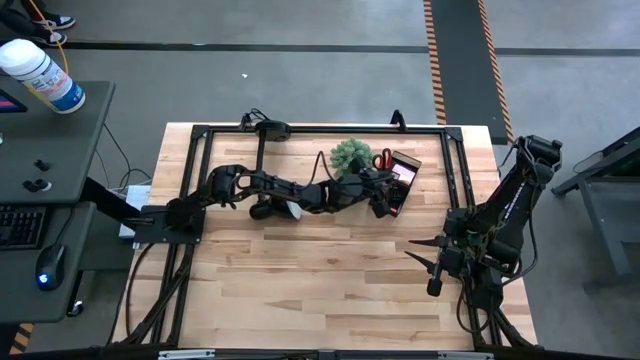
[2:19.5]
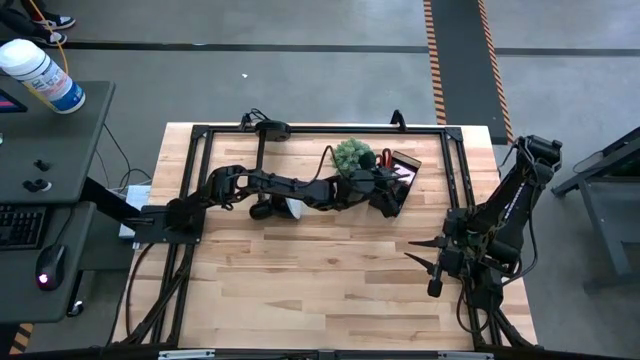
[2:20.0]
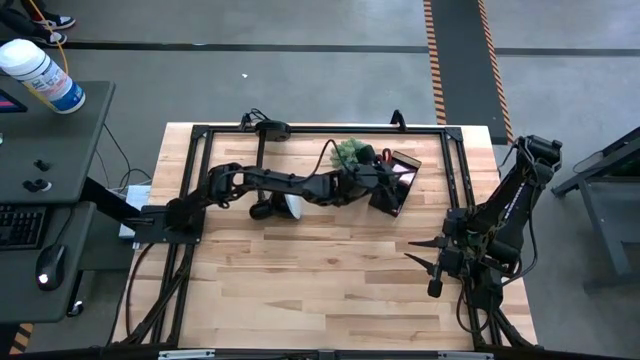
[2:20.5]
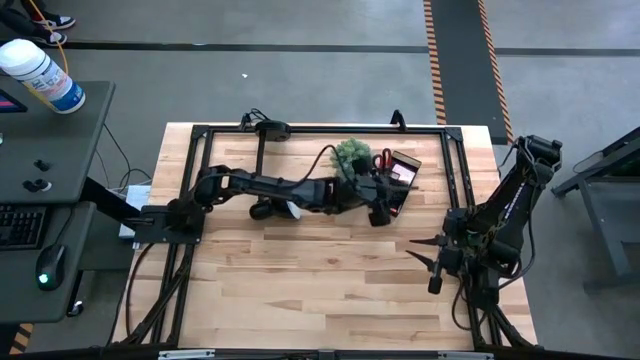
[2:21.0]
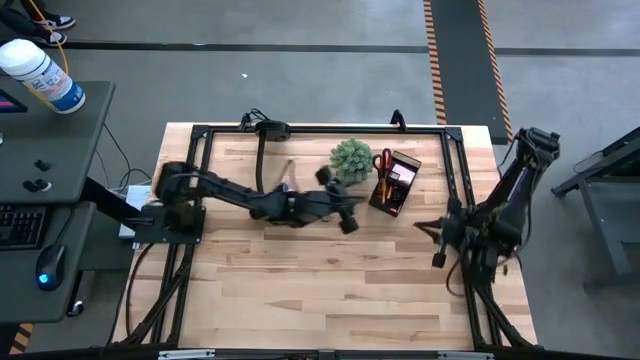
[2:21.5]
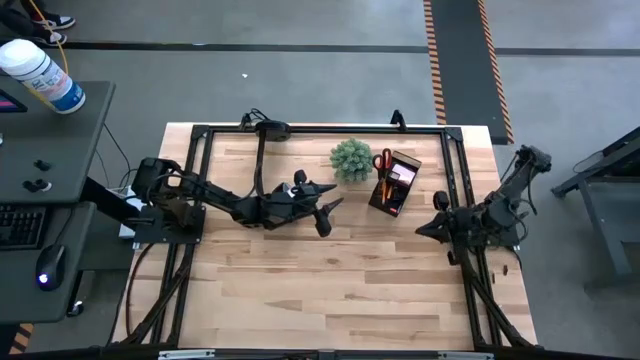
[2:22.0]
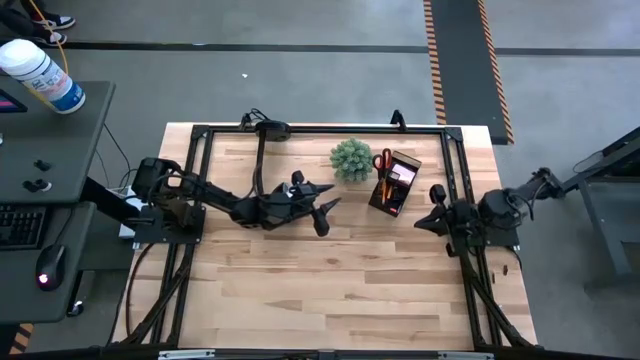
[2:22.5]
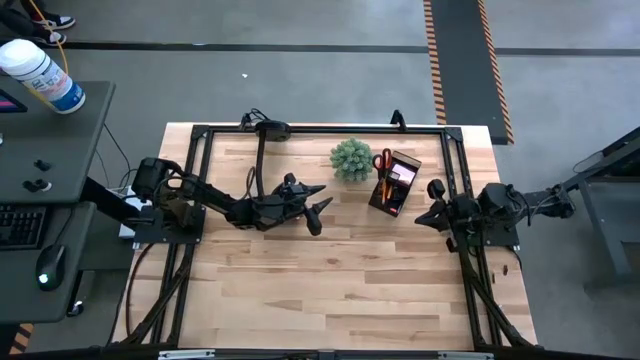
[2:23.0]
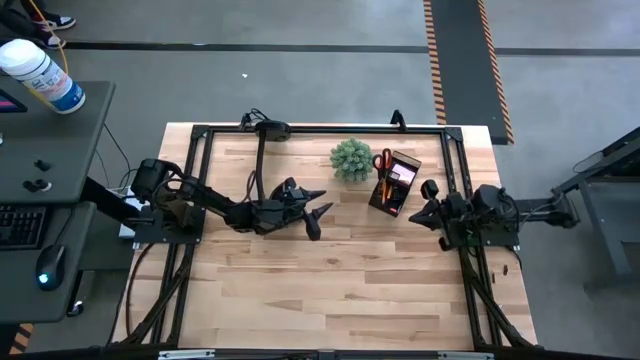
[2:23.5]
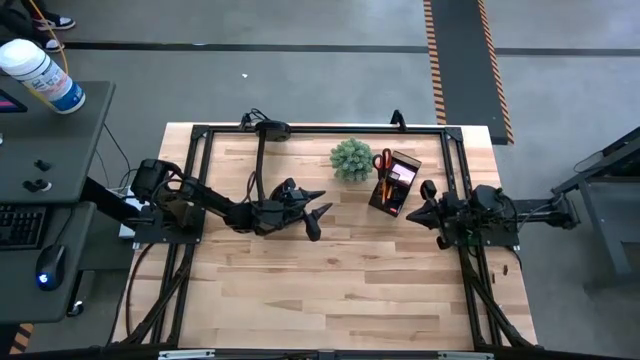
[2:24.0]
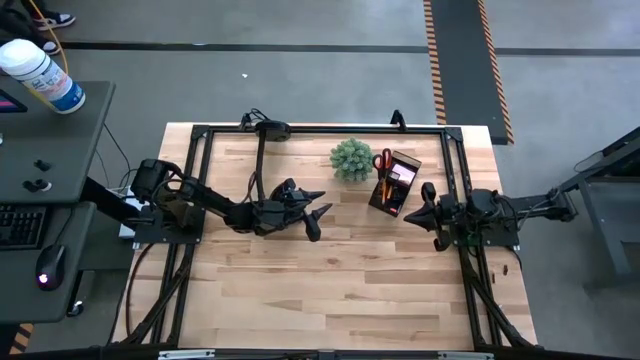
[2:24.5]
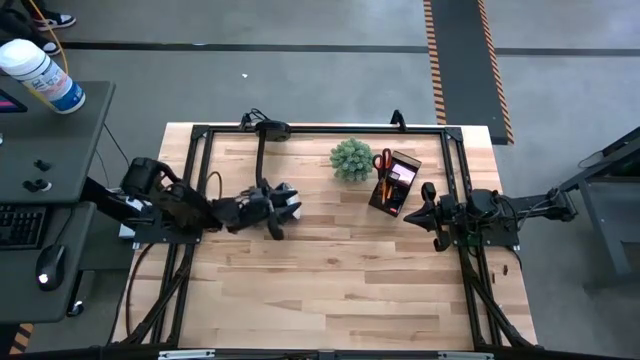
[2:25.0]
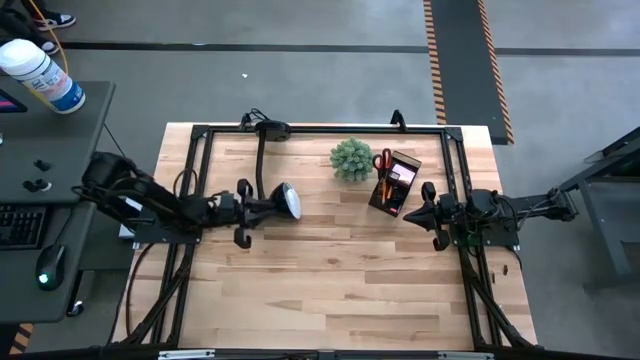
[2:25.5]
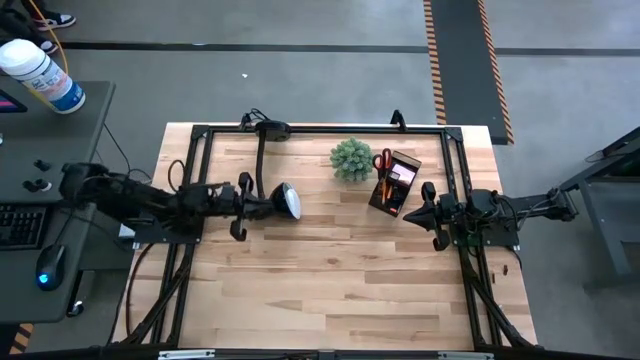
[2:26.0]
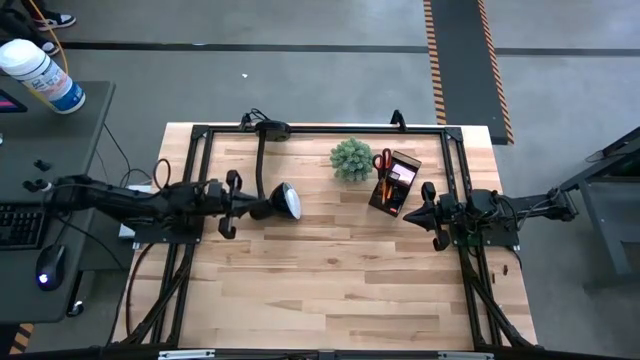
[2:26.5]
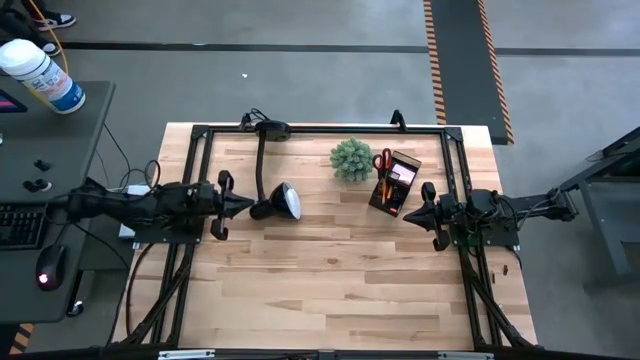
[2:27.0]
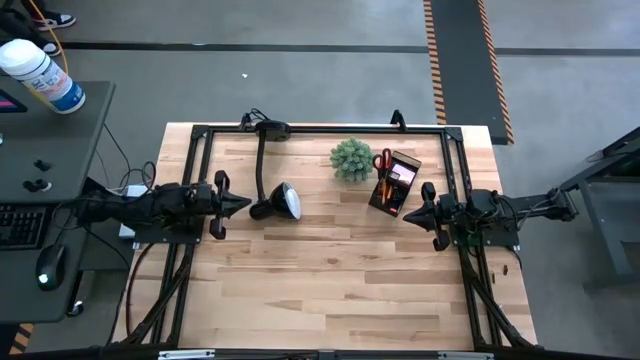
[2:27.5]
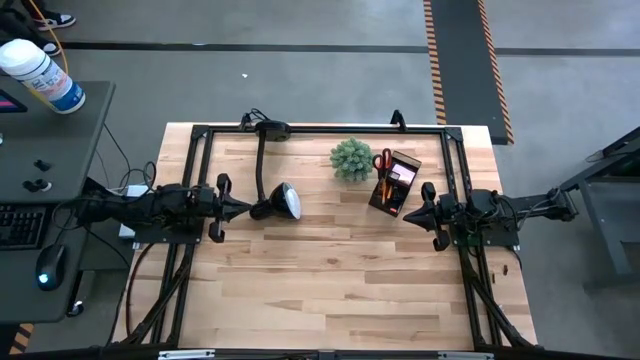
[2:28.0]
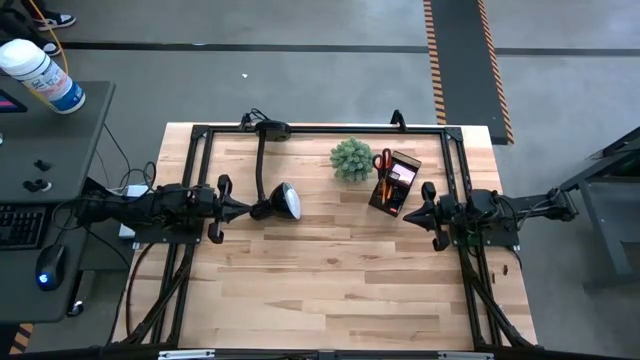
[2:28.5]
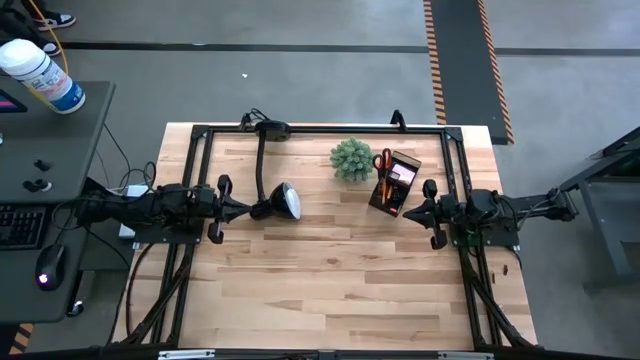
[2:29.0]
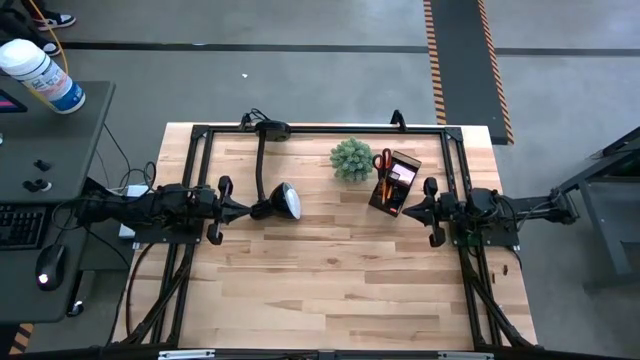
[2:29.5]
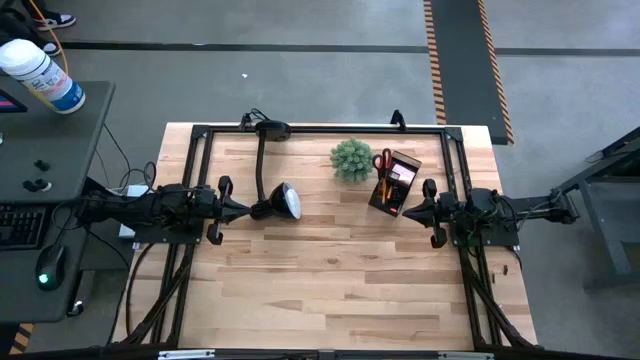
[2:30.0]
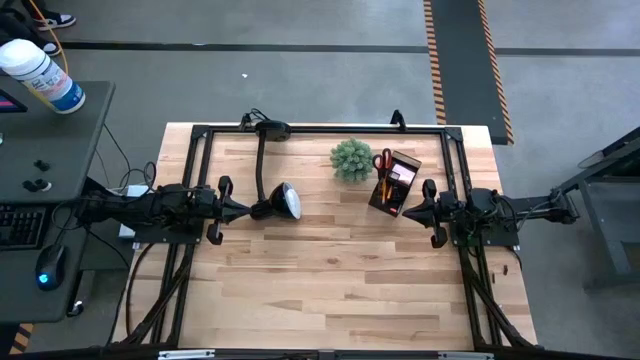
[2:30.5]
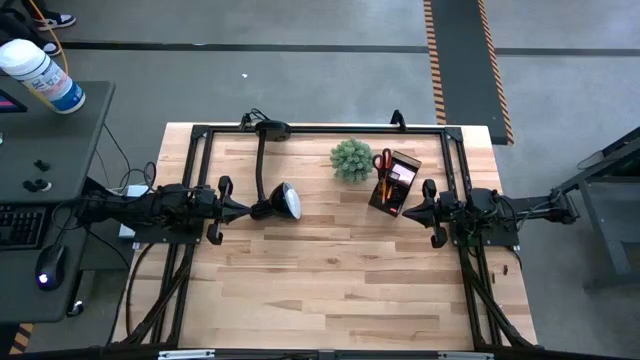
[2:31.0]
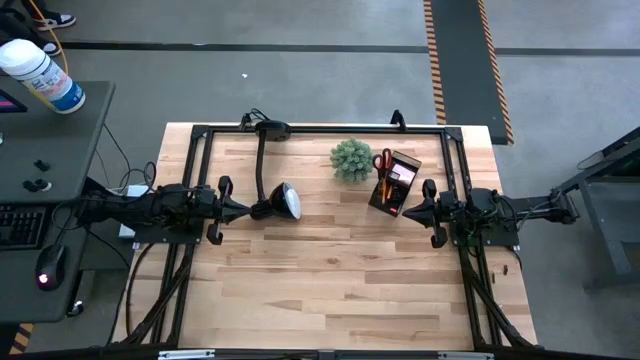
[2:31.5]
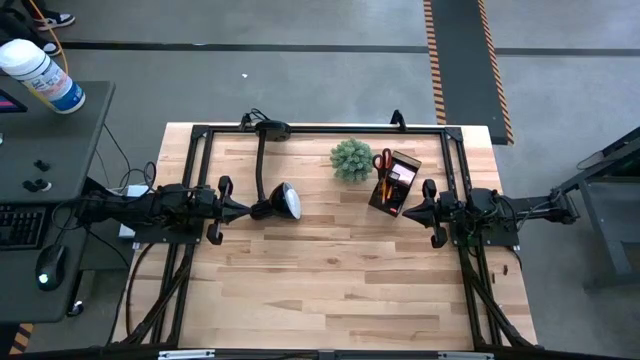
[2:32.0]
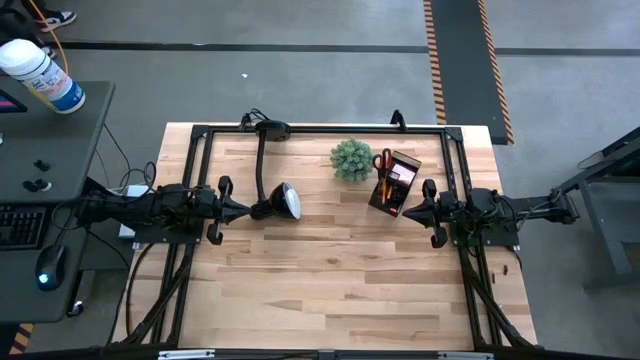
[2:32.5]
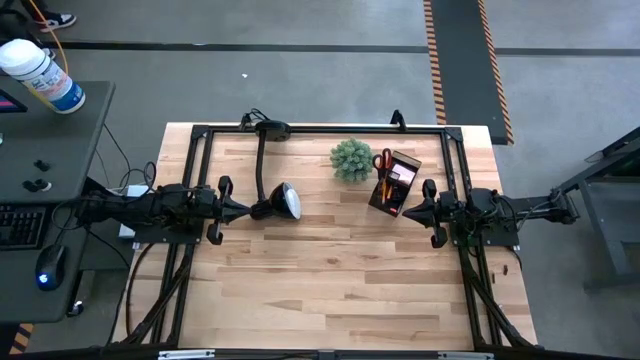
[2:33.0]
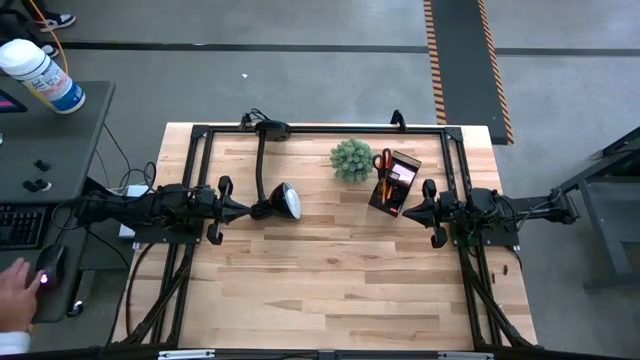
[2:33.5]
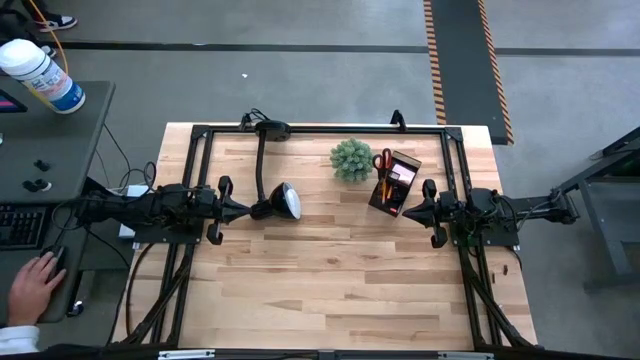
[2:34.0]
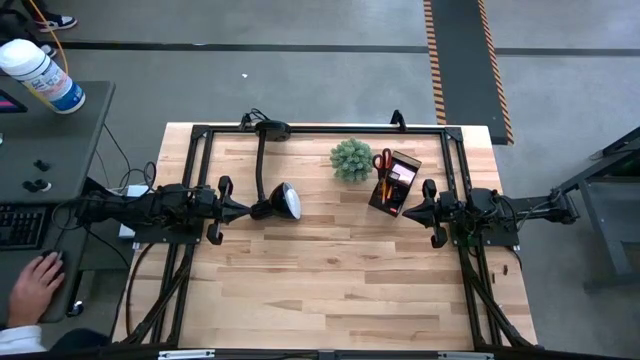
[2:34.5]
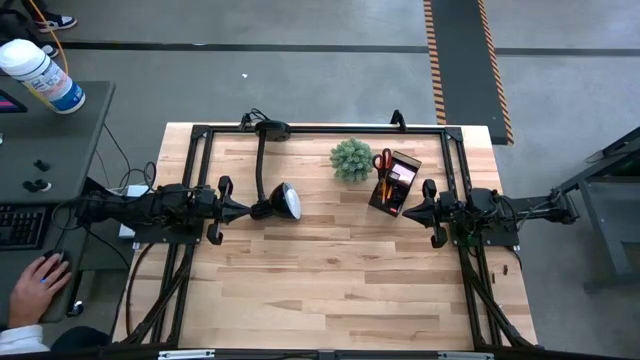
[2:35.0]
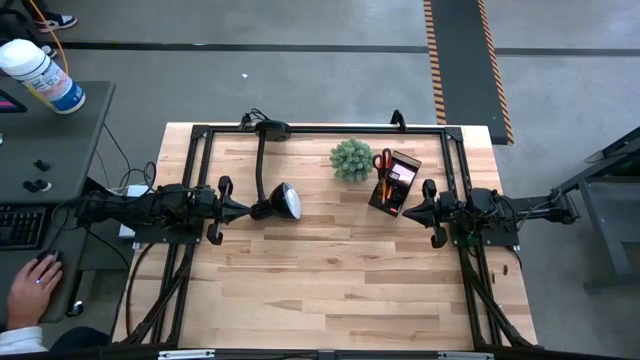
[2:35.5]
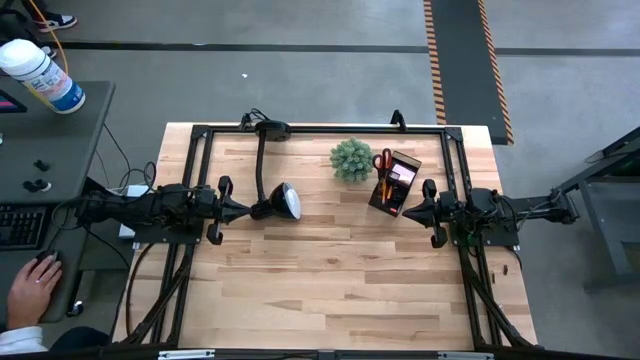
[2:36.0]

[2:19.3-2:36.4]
Task: Pick and place office supplies into organizer
Return to Home Position

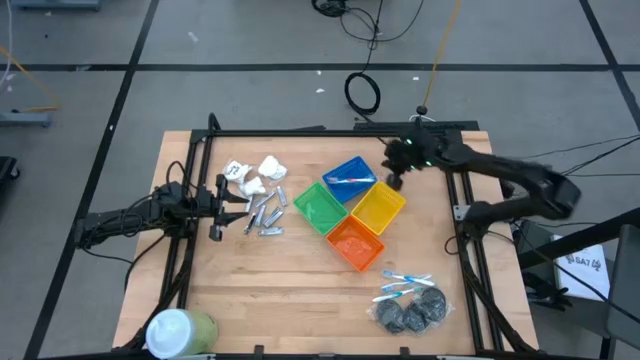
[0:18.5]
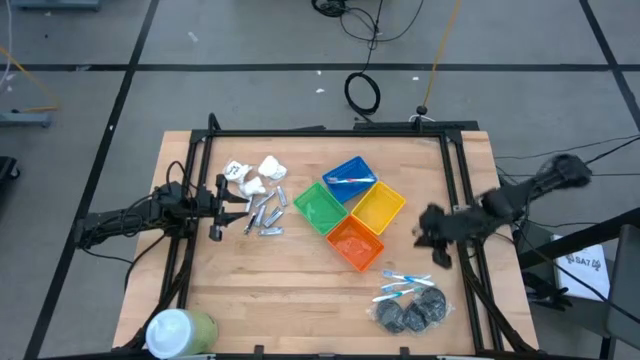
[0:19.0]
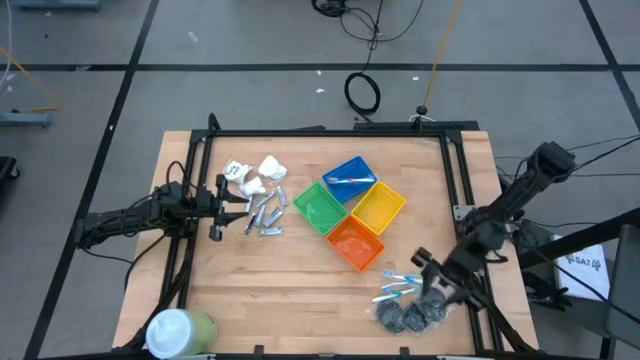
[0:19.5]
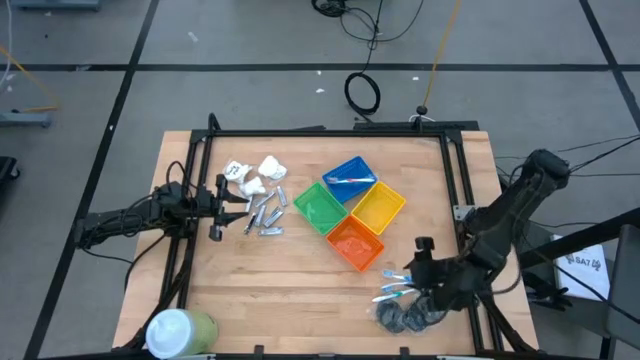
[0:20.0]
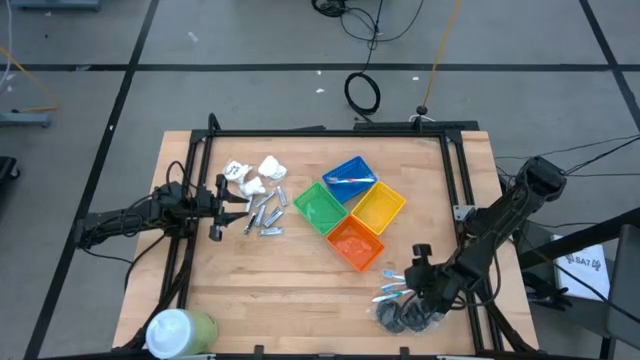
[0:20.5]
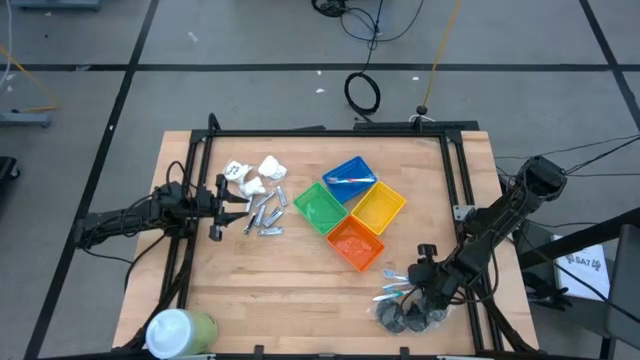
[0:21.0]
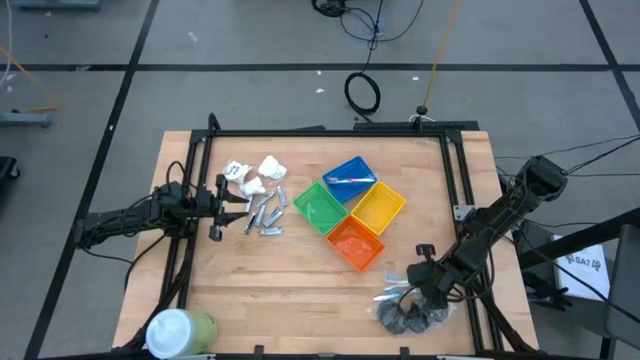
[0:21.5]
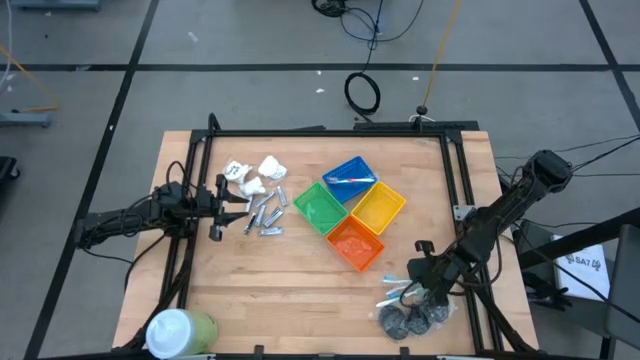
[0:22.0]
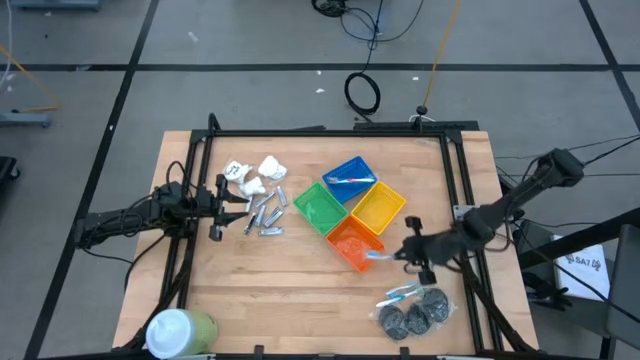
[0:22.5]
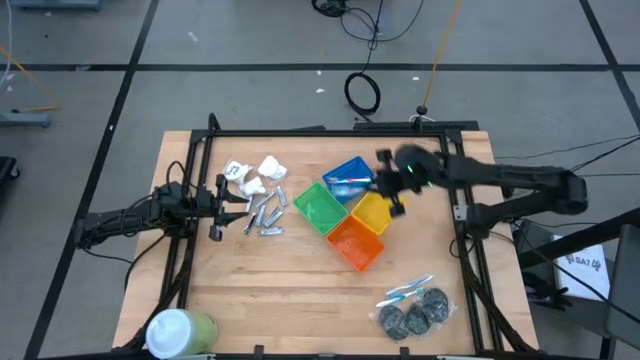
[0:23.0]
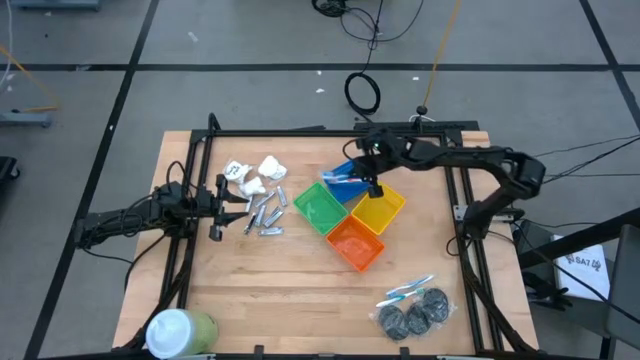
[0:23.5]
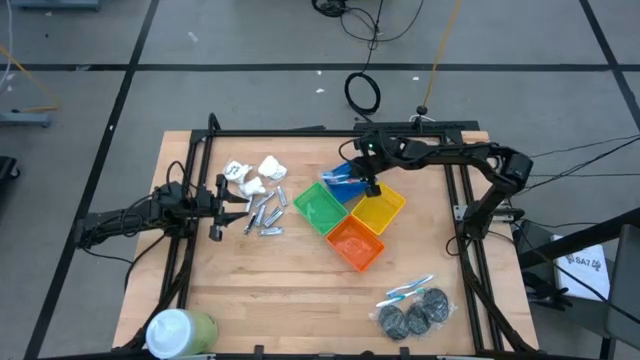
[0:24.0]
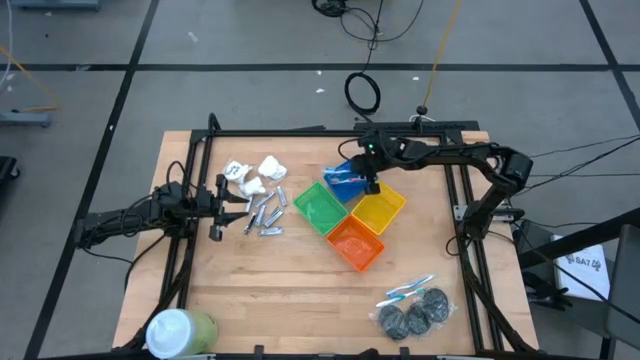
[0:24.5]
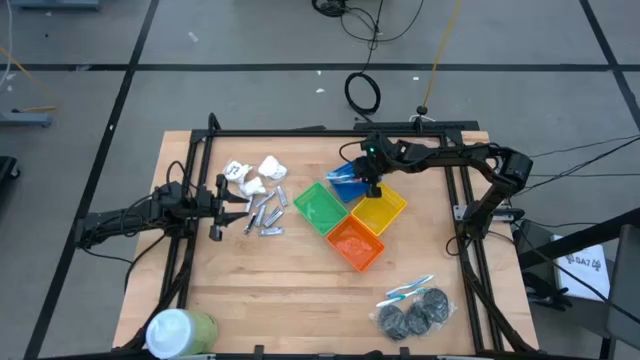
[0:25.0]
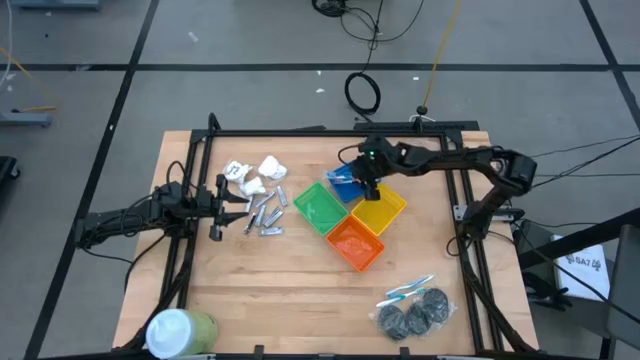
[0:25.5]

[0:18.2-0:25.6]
Task: Pick & Place Travel size toiletries
Put the blue toothbrush into the blue bin
